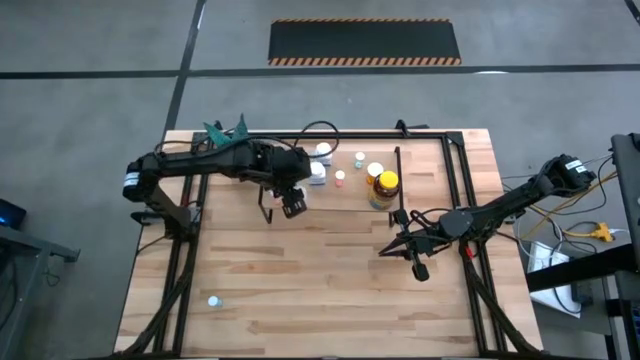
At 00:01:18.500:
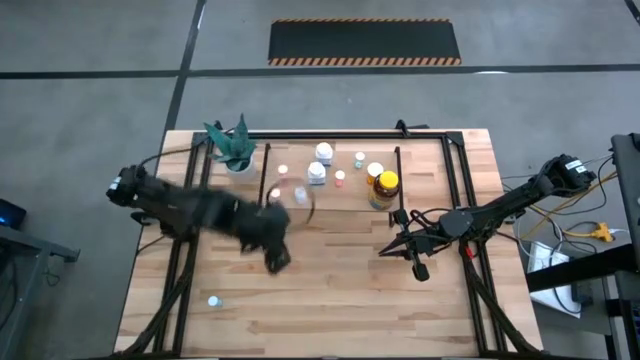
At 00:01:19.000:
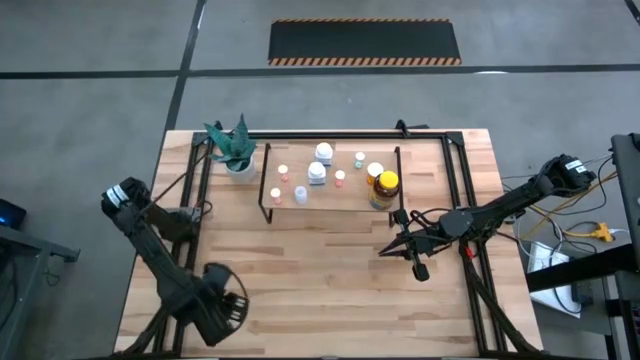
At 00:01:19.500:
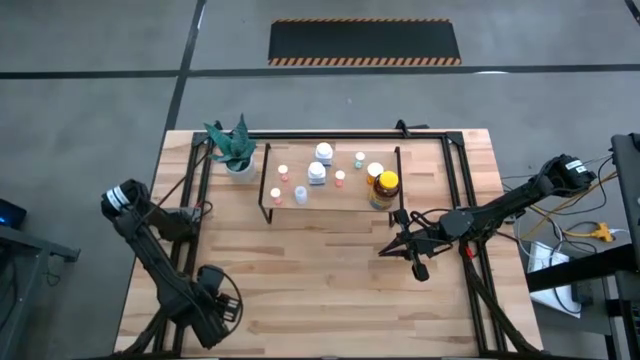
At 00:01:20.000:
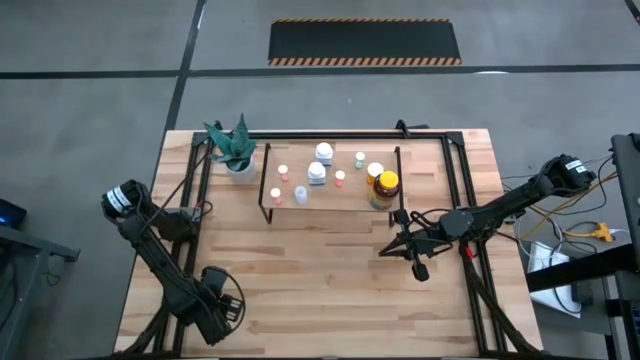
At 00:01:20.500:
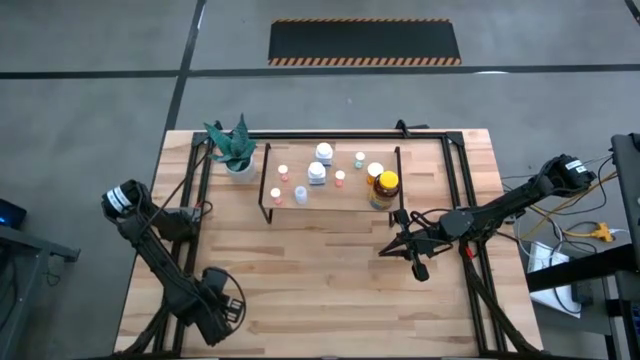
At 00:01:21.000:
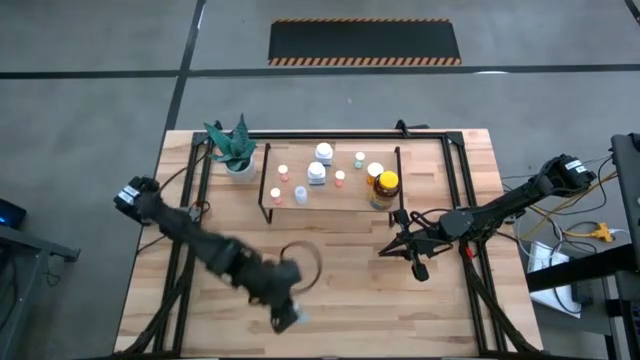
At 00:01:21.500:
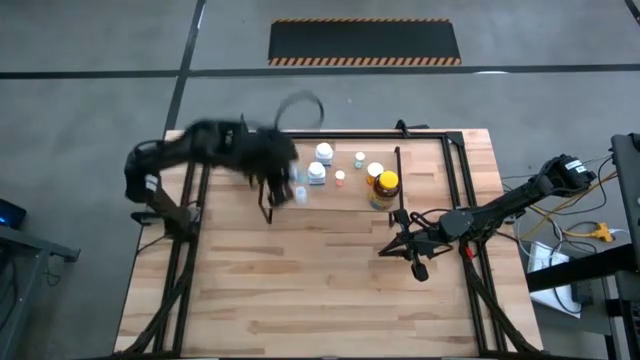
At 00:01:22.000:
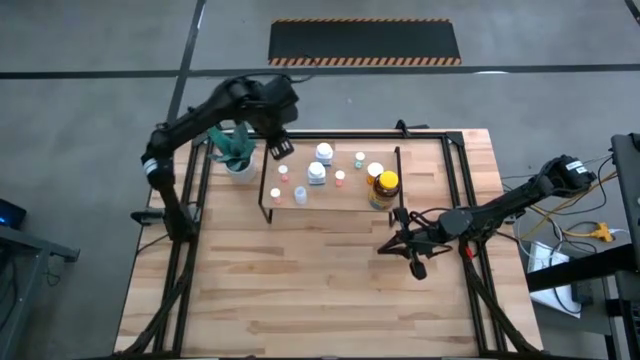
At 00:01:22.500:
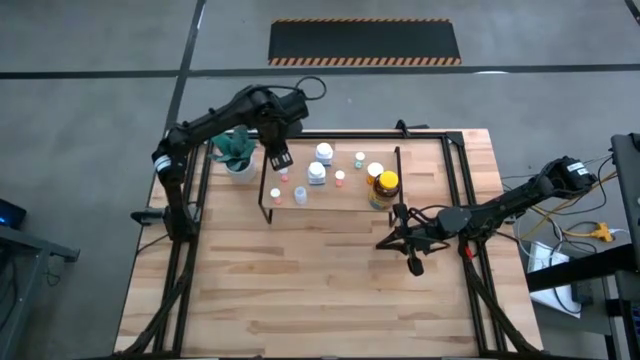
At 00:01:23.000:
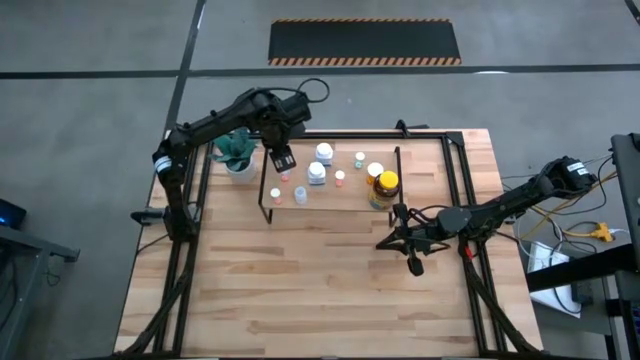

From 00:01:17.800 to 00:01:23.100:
Task: Pick and place medicine bottles onto shelf by color
Put the blue pill bottle on the shelf

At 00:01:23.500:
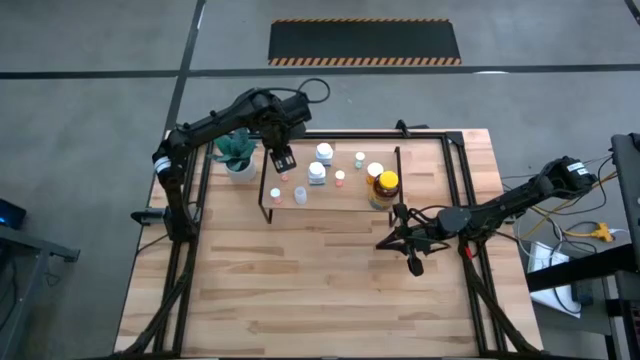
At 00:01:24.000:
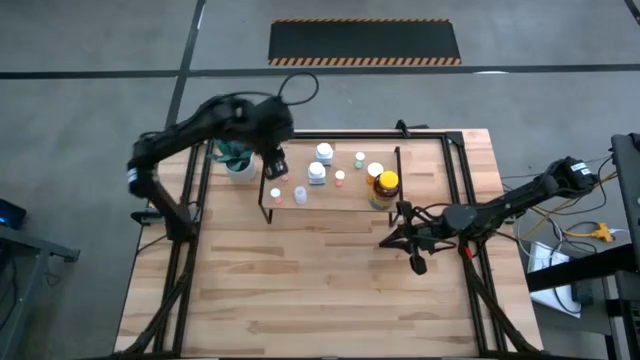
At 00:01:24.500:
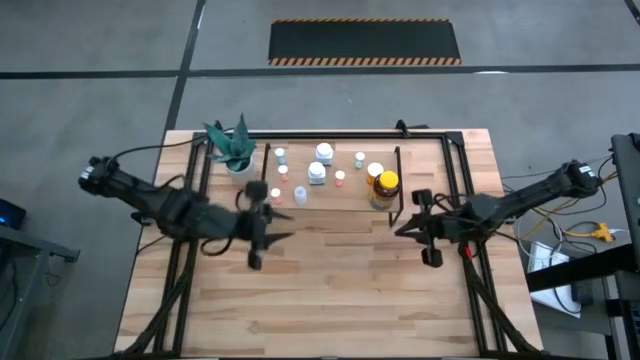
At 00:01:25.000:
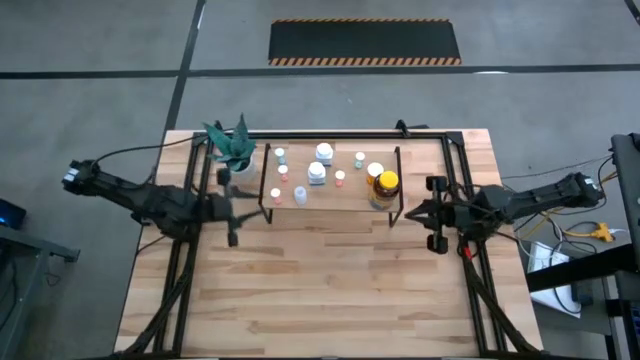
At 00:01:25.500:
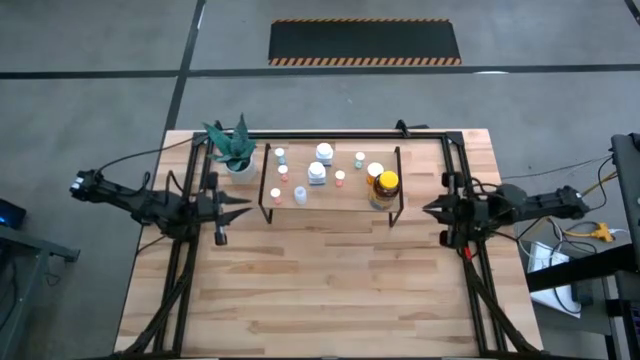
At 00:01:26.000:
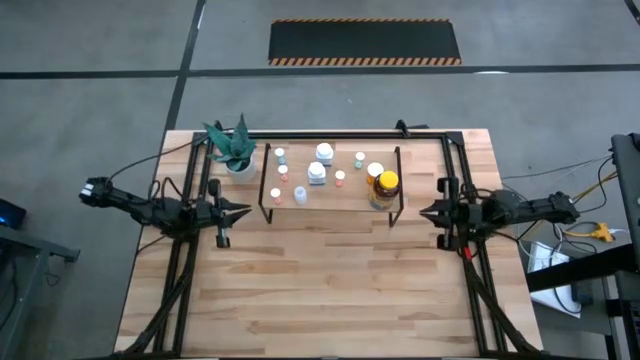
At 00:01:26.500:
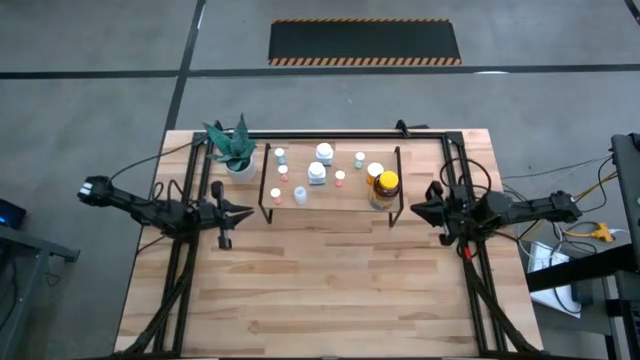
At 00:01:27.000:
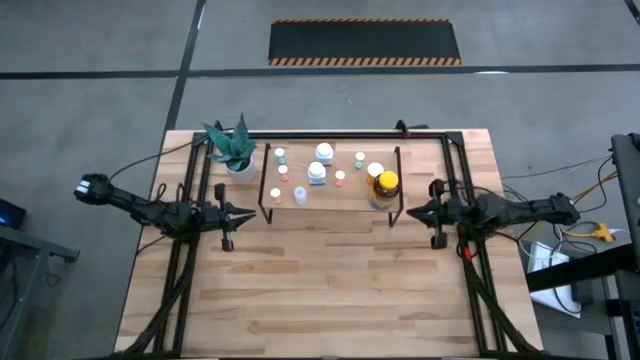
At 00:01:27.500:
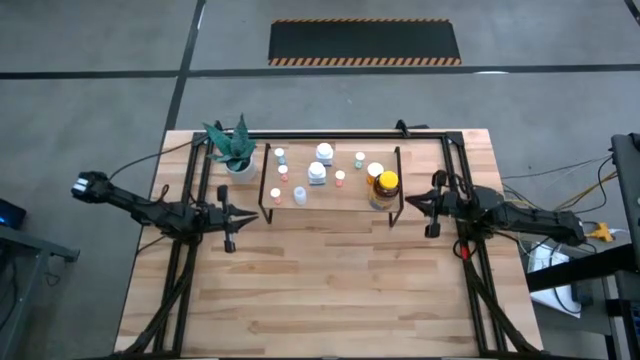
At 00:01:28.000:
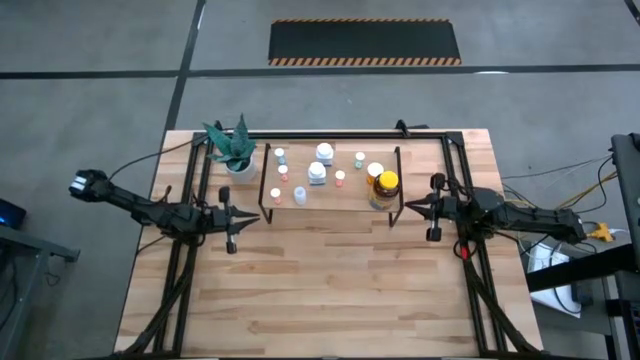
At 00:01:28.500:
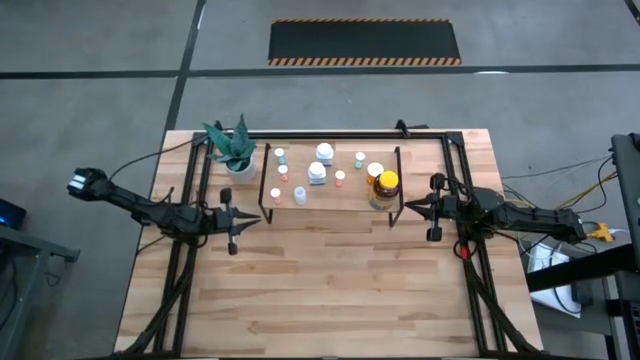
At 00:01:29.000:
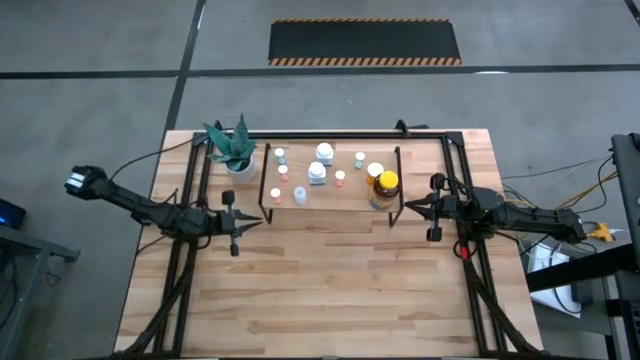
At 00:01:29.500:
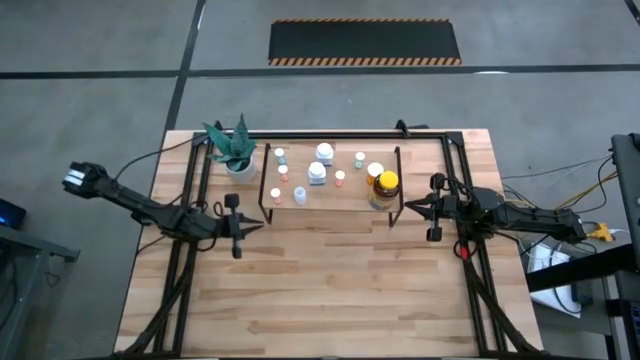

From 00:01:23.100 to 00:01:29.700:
Return to Home Position

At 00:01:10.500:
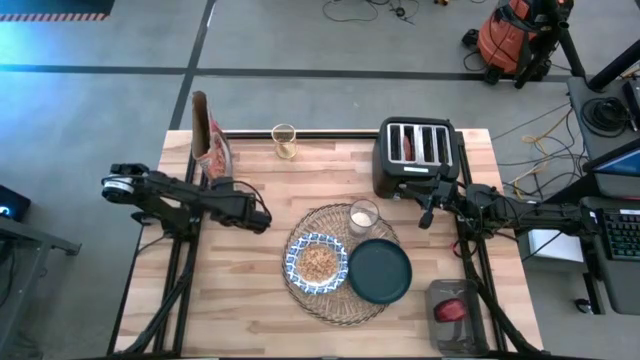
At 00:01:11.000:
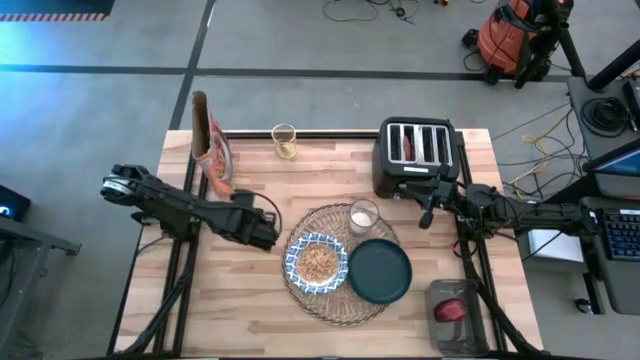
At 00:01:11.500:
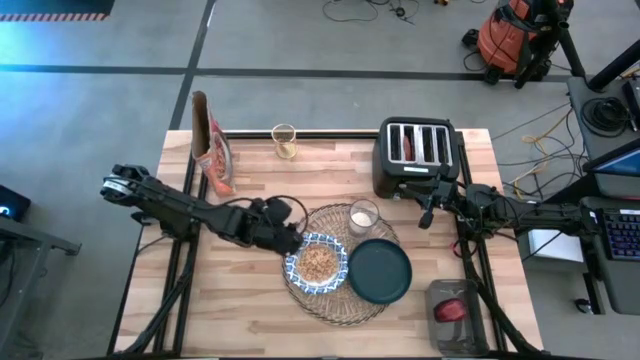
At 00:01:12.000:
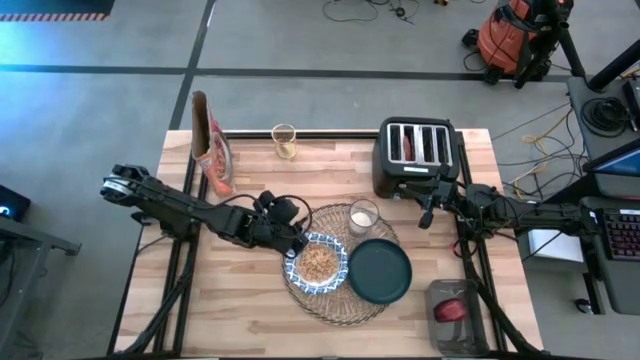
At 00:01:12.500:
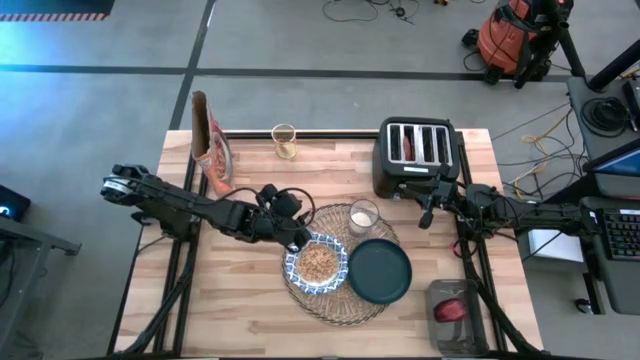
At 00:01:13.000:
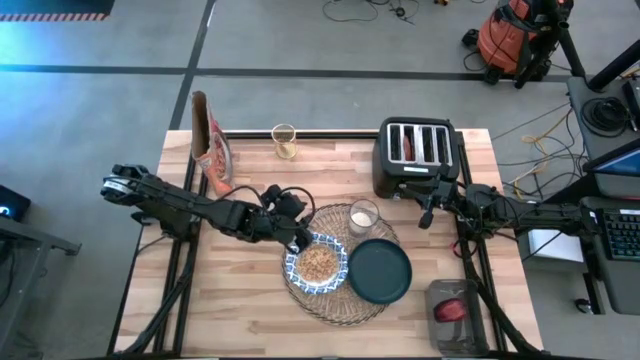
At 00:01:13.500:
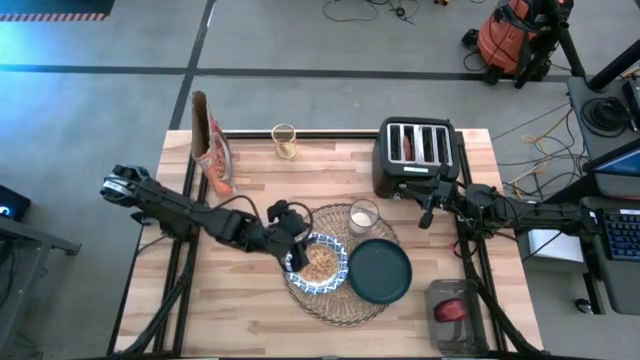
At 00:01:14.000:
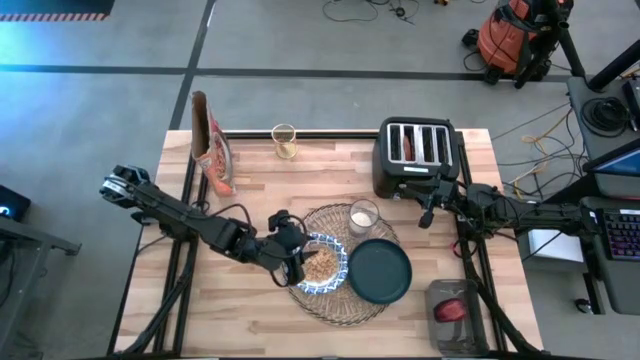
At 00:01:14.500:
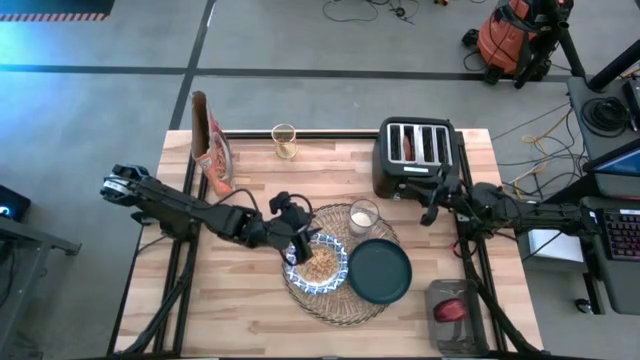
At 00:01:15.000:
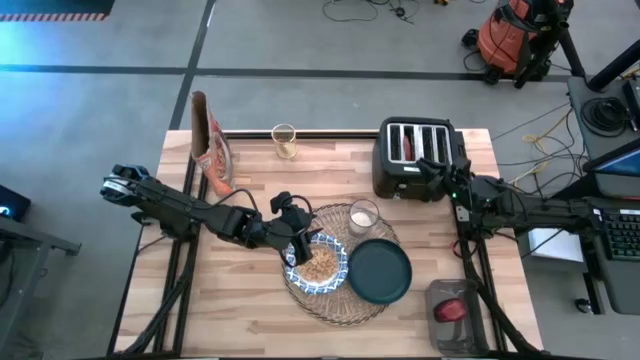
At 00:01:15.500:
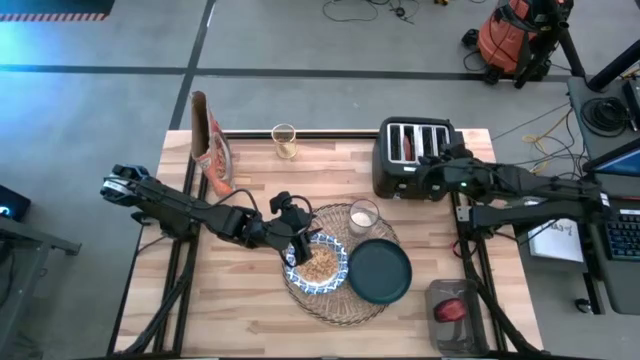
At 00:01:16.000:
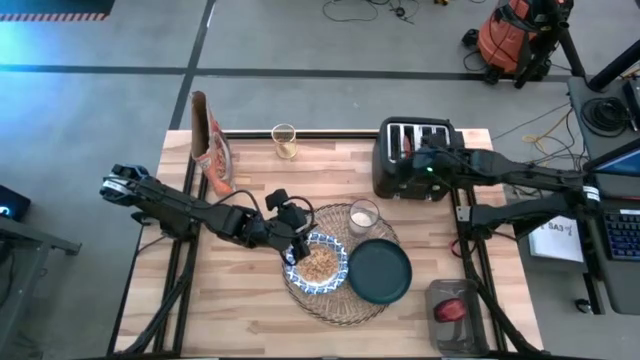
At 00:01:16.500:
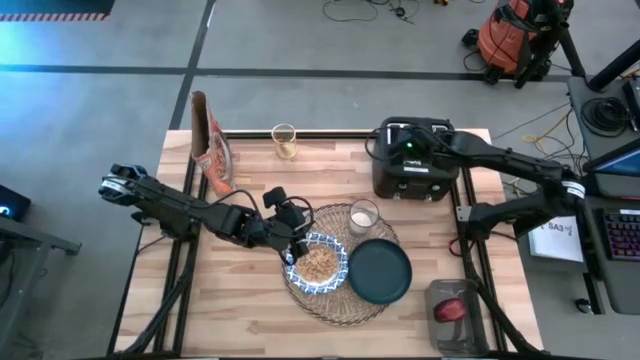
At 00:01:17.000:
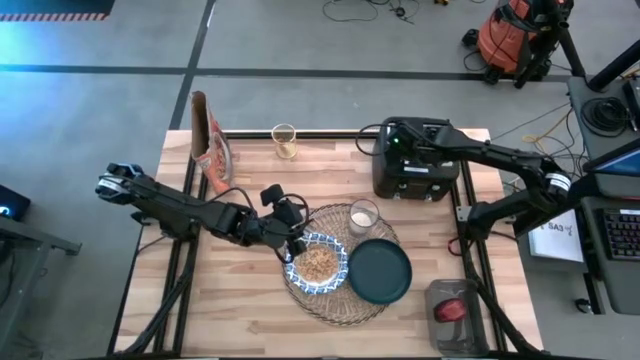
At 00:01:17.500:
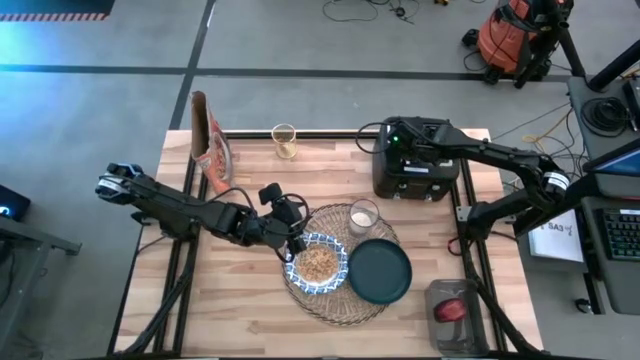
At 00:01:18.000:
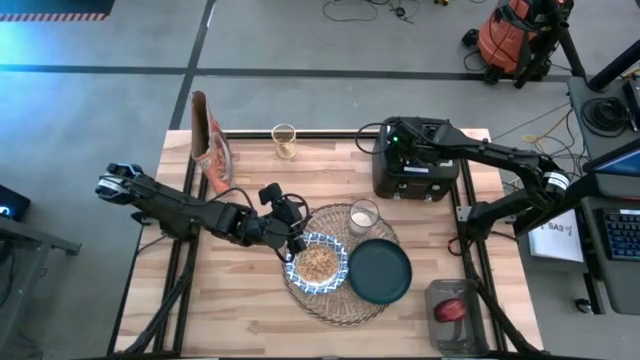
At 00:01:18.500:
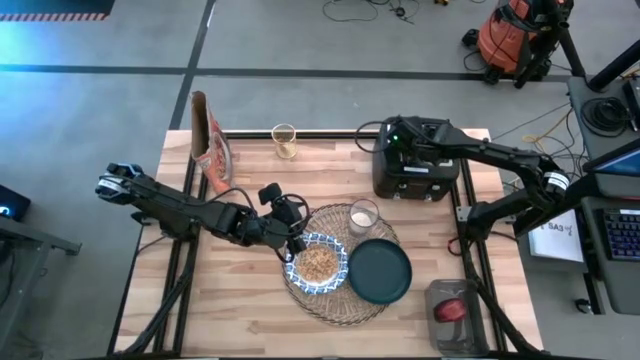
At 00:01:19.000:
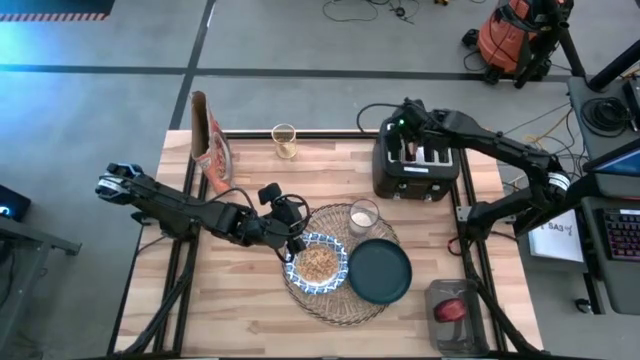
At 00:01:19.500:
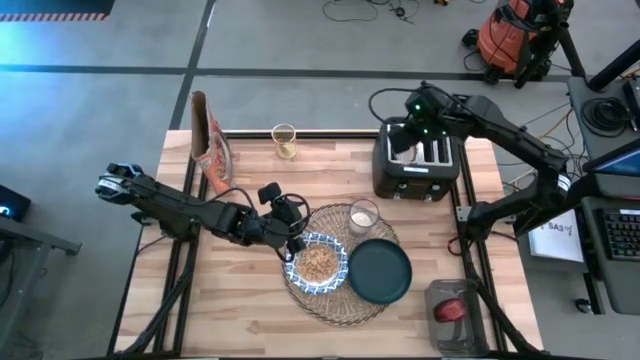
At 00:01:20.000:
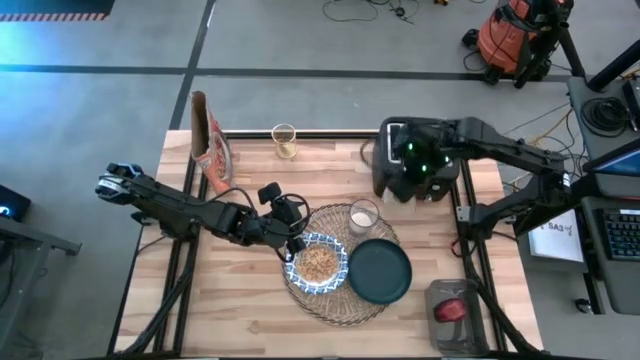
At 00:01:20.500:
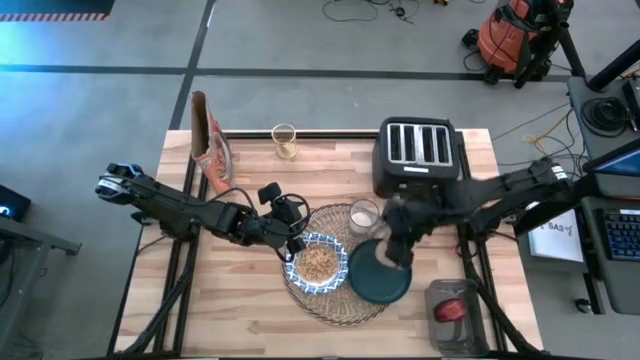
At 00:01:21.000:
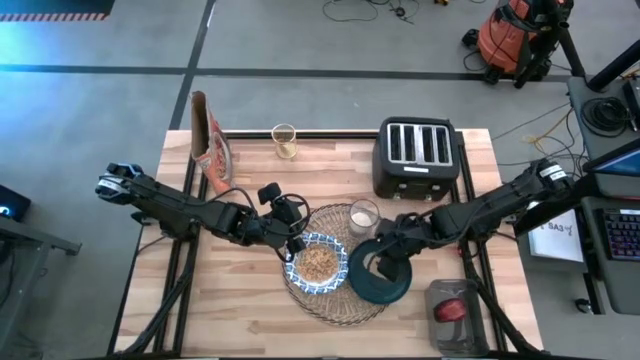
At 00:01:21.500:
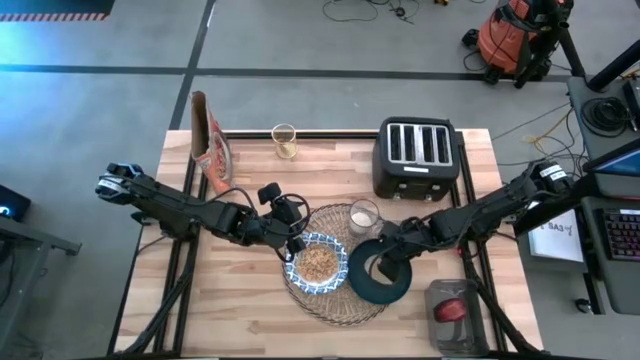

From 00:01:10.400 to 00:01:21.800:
Task: Arrange a breakfast setting
Put the brown bagel on the black plate
